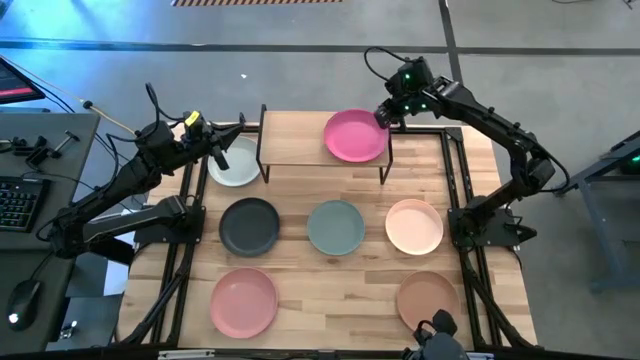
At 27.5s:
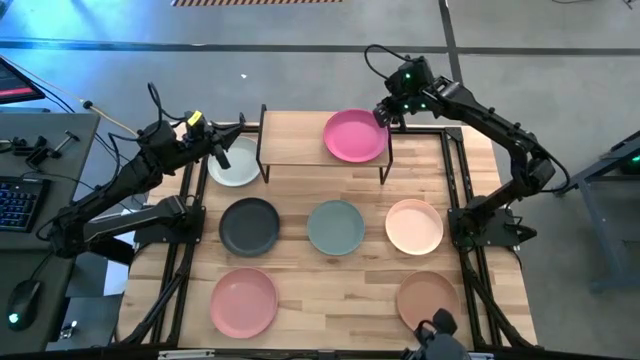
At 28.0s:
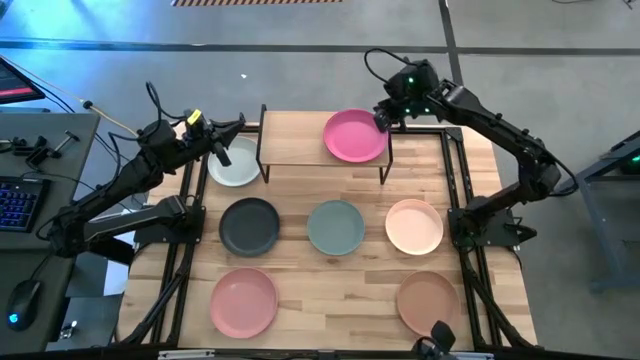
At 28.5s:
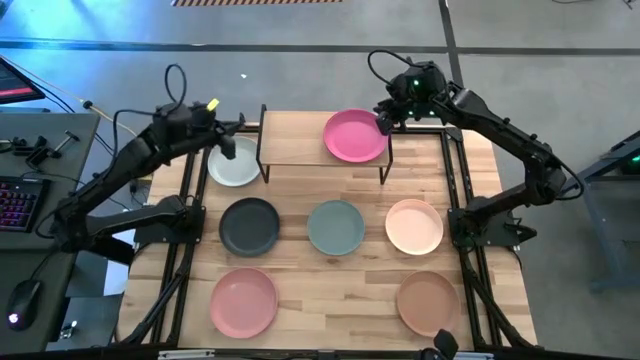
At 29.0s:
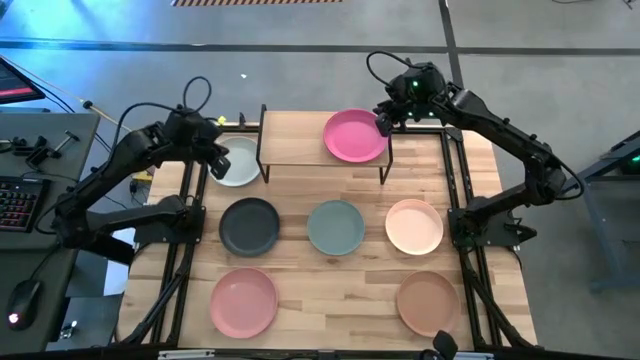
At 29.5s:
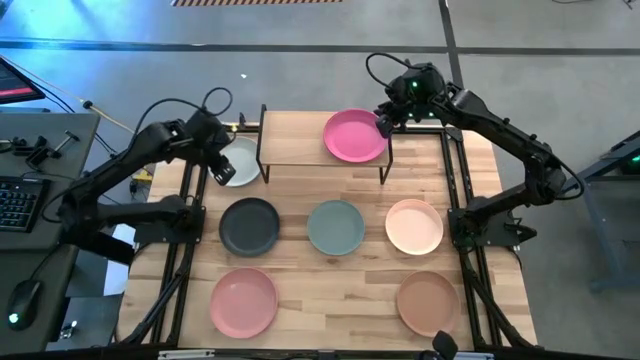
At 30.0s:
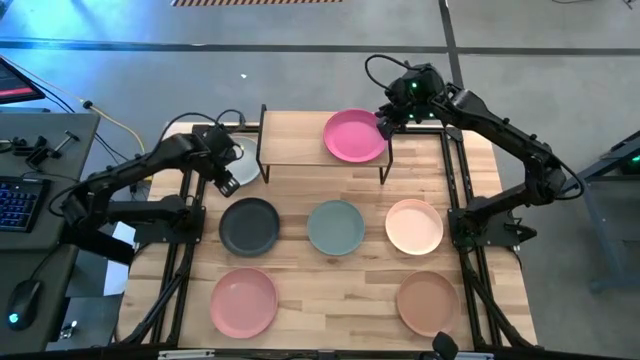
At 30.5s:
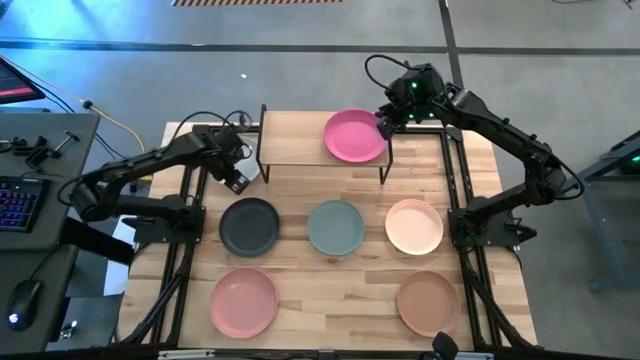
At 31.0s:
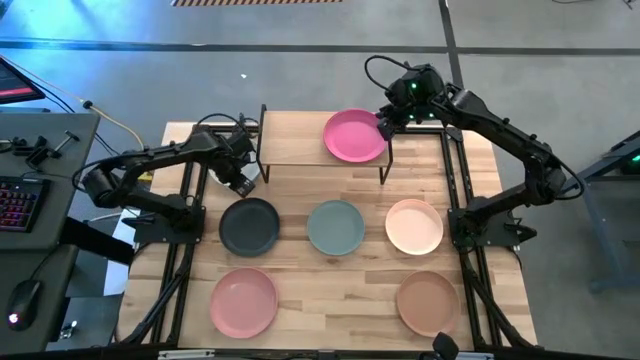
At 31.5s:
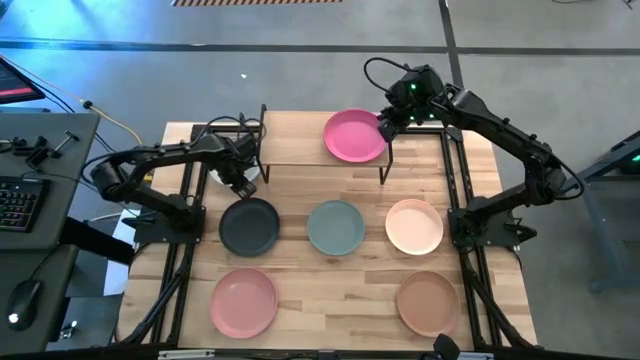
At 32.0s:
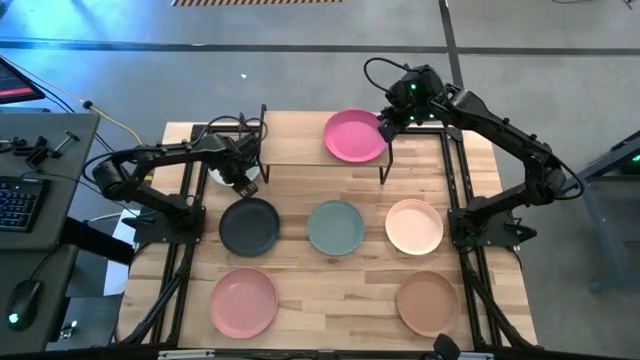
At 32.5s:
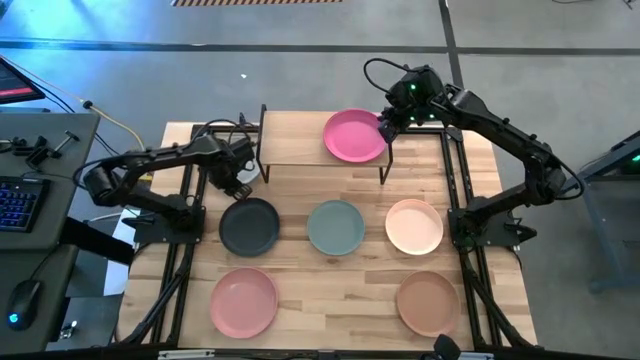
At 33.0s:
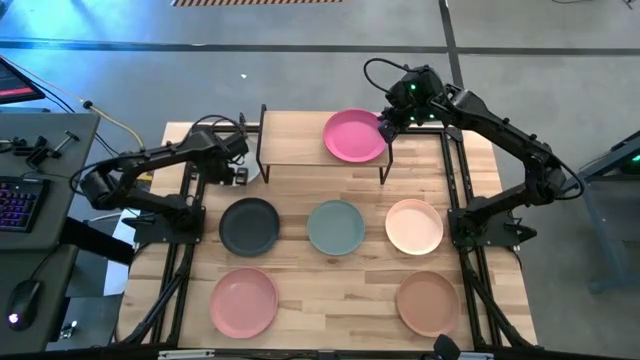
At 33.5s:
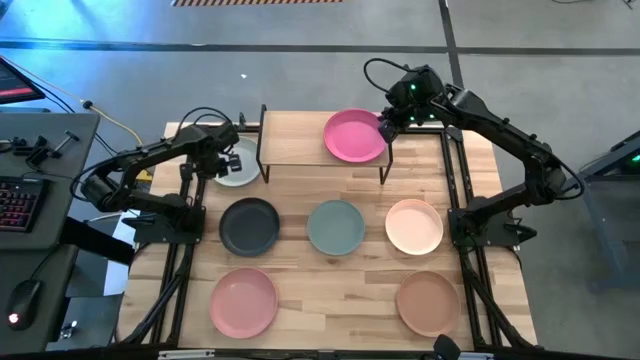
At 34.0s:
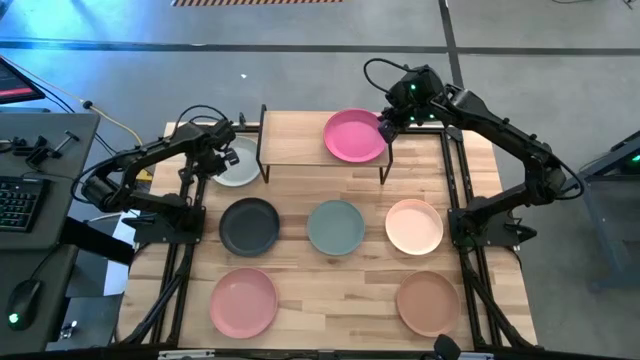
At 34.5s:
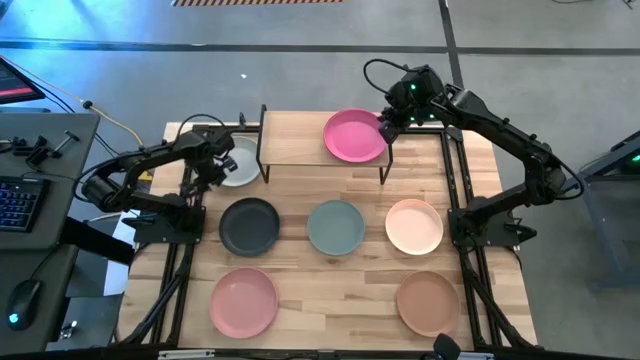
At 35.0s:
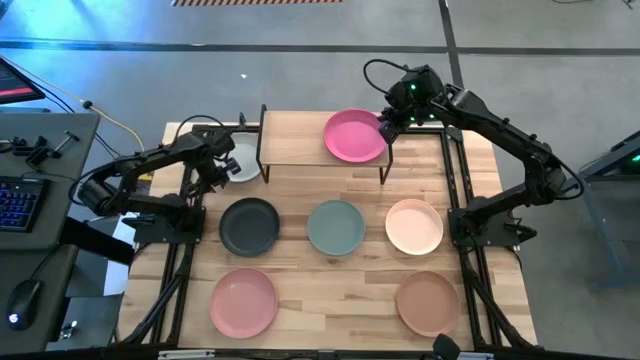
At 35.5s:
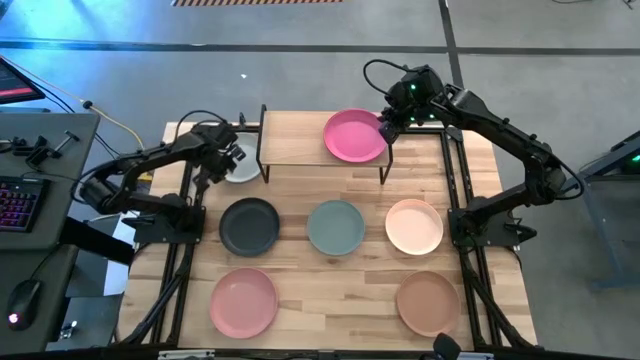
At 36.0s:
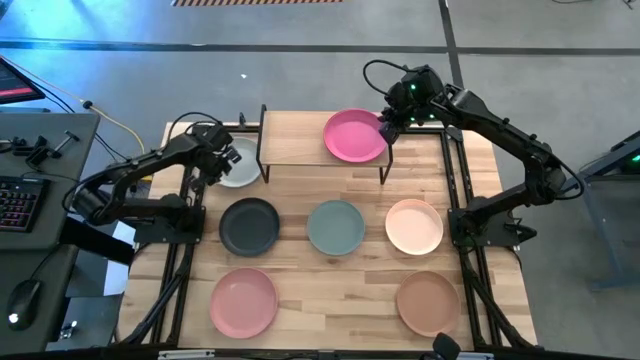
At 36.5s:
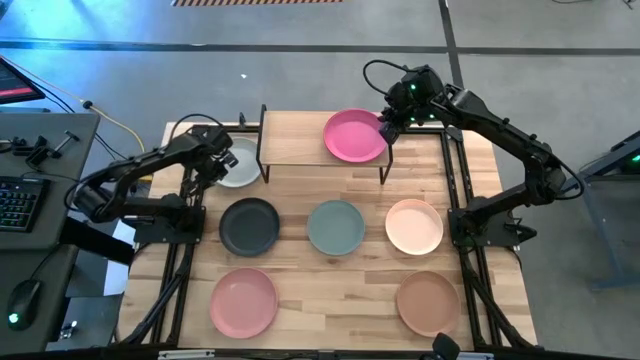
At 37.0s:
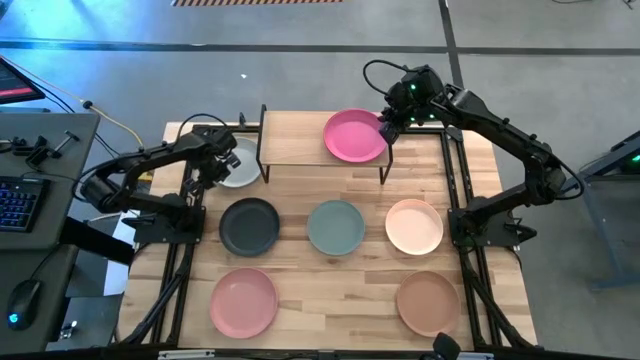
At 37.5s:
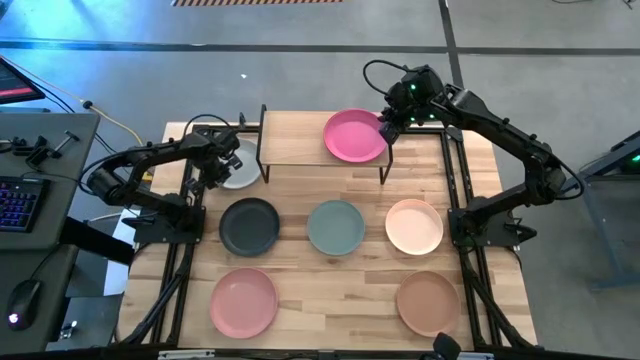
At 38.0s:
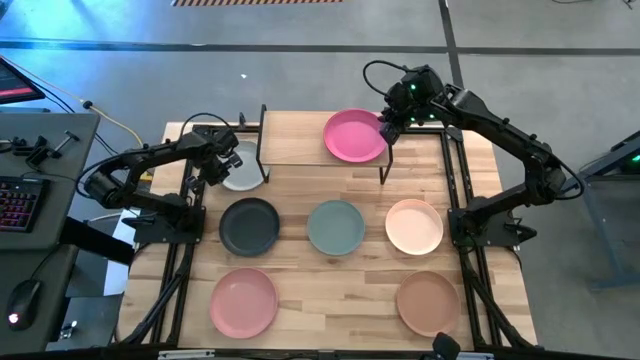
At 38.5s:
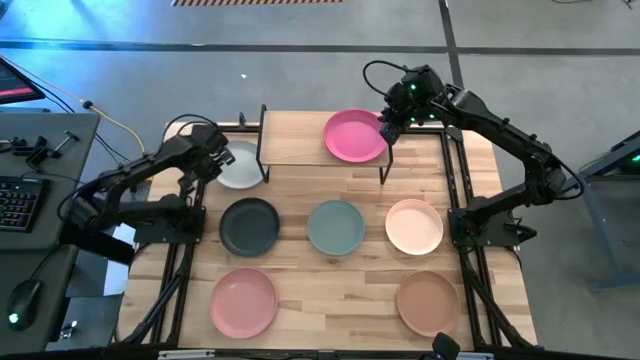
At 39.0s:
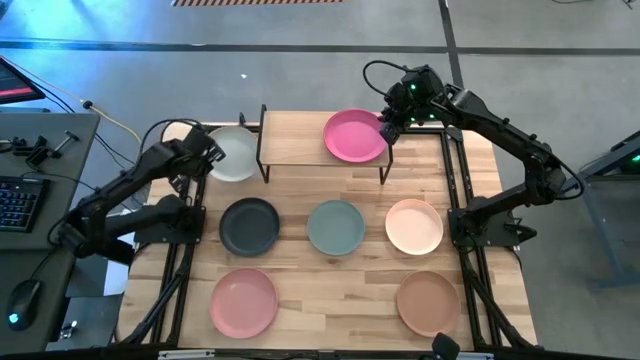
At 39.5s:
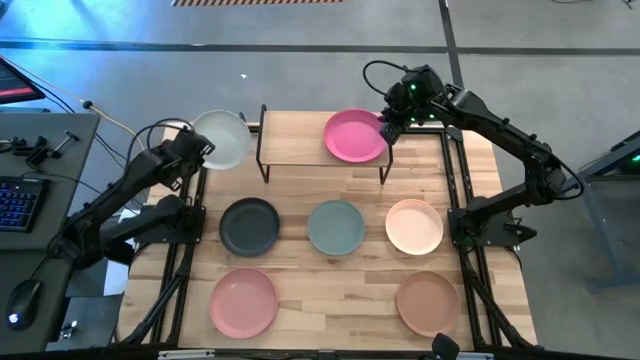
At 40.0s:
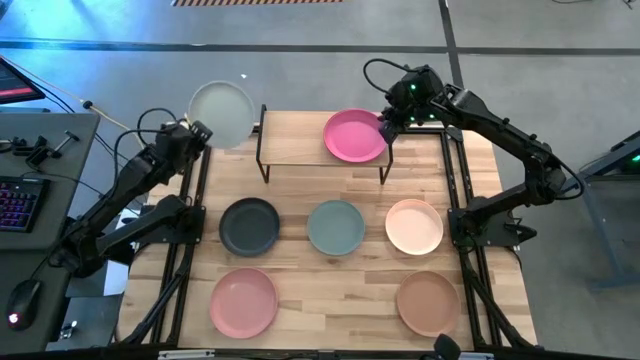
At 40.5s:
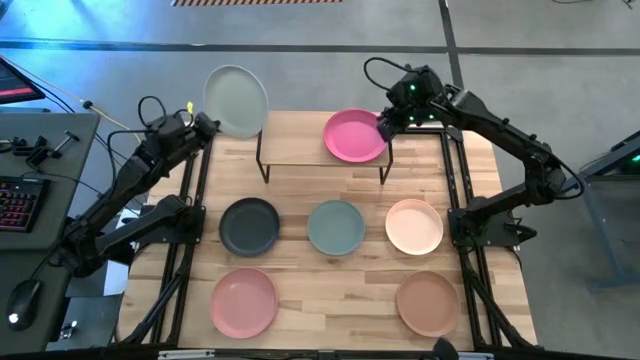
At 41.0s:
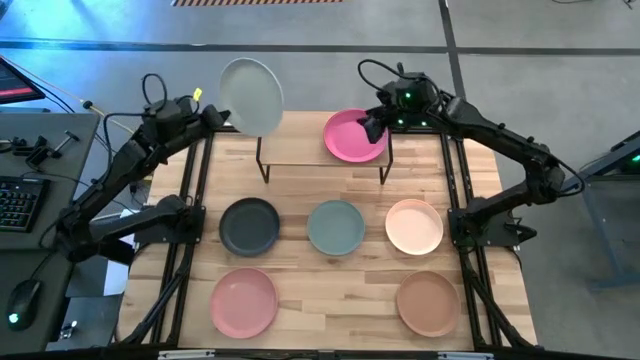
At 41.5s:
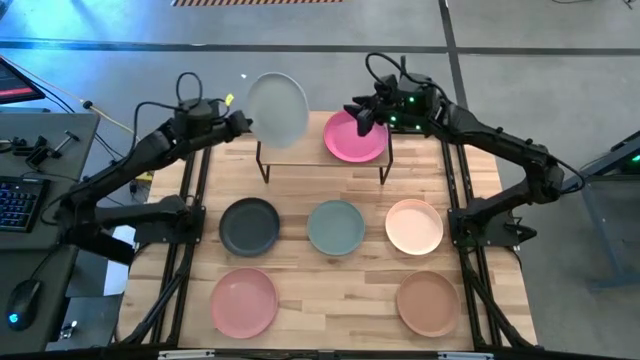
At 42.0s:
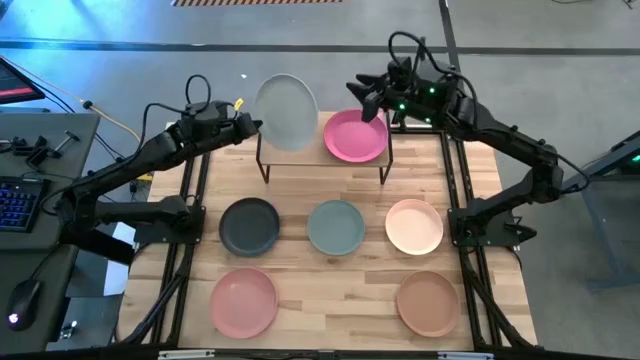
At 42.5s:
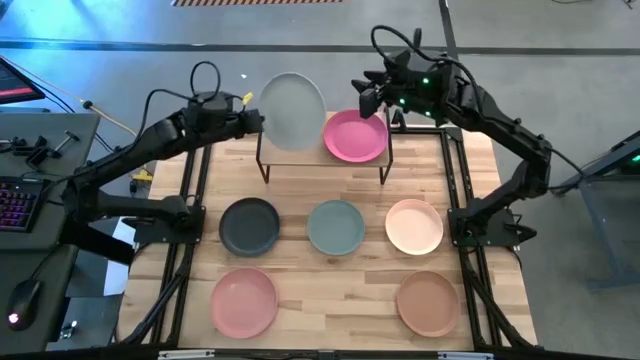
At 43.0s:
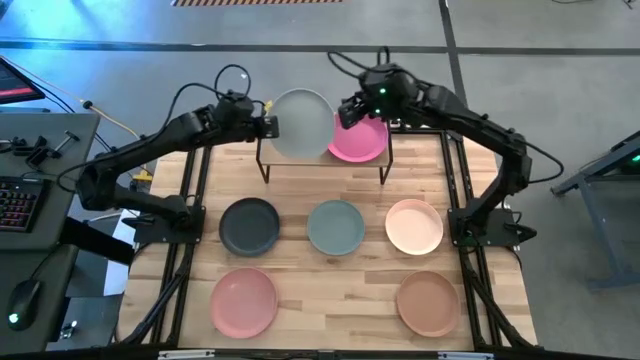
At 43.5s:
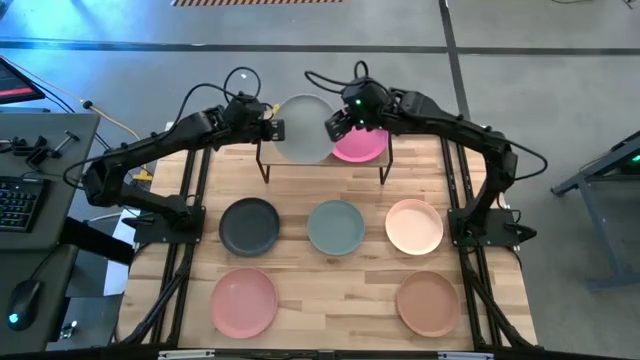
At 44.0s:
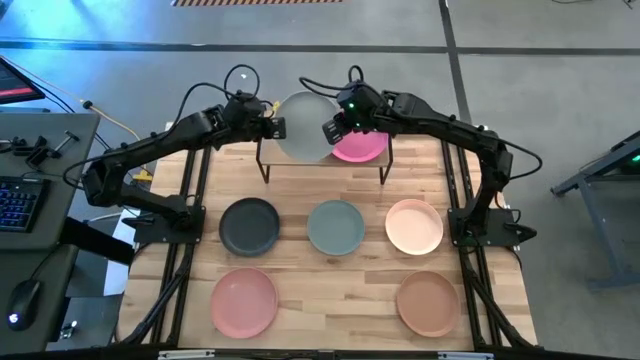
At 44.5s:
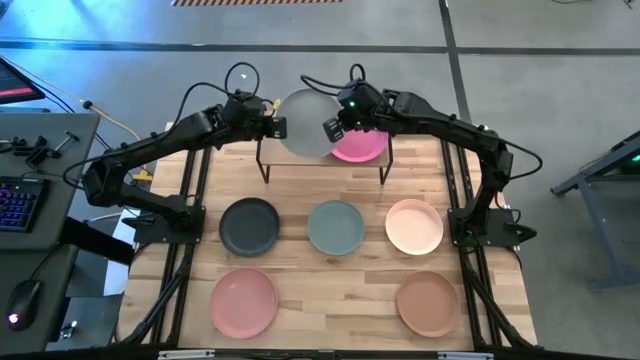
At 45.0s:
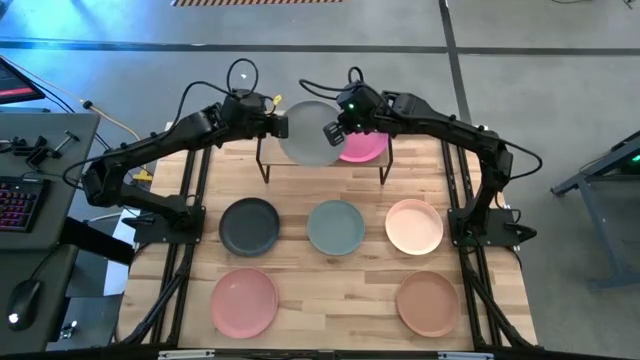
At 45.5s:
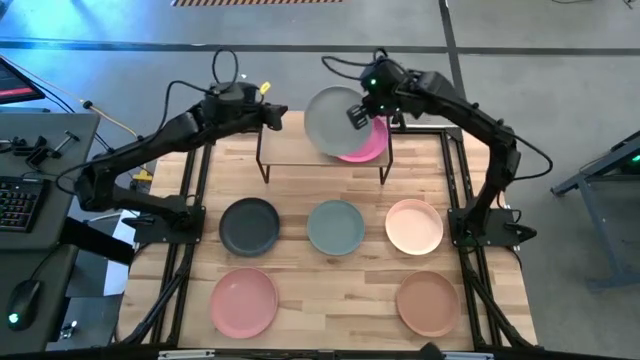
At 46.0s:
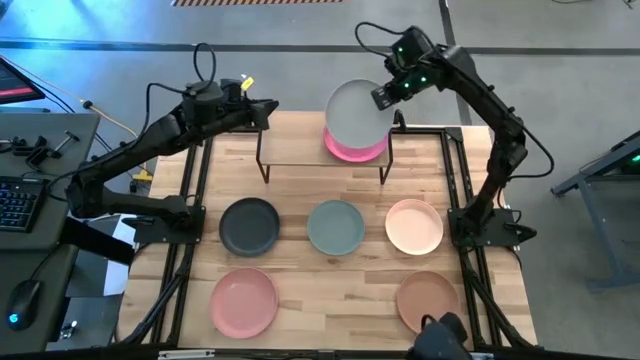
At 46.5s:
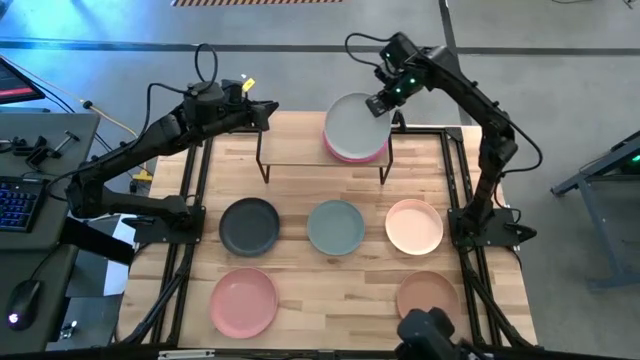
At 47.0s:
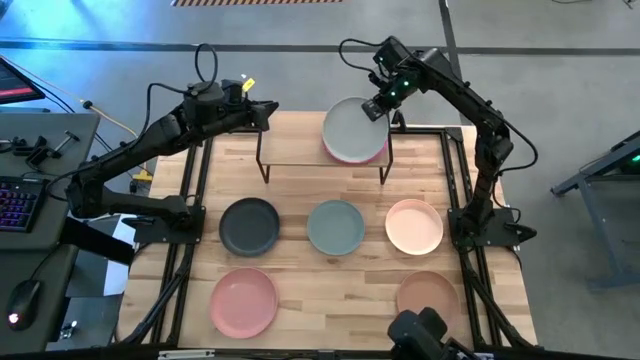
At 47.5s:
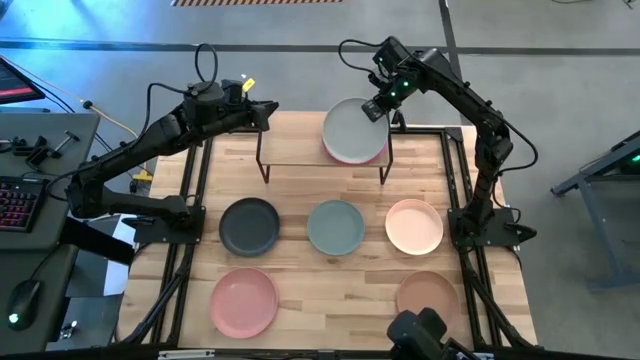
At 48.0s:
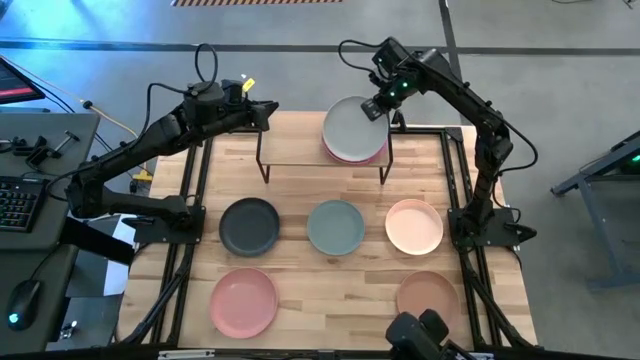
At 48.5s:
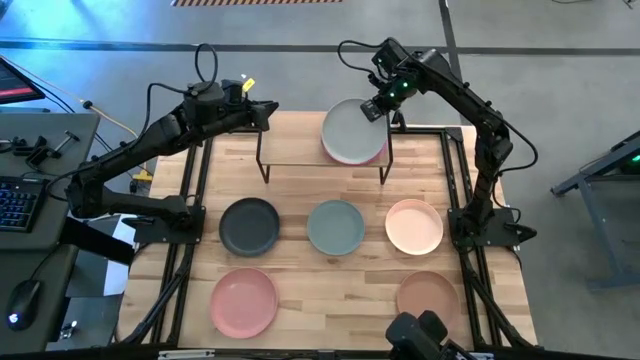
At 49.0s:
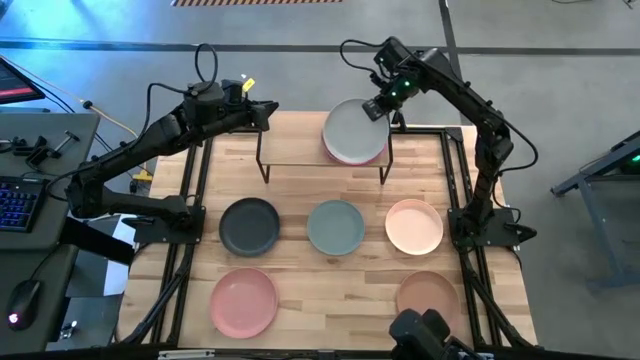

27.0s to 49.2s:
Task: Place and stack plates onto a shelf
Stack the white plate on top of the pink plate on the shelf
